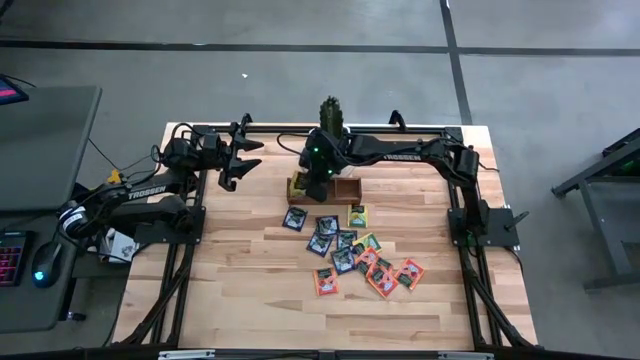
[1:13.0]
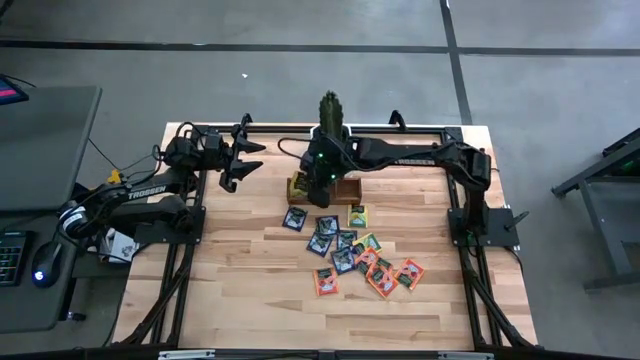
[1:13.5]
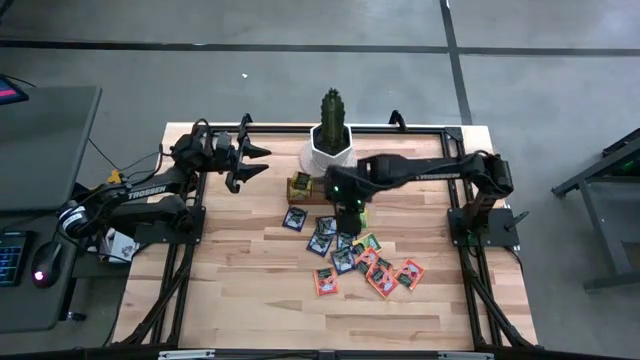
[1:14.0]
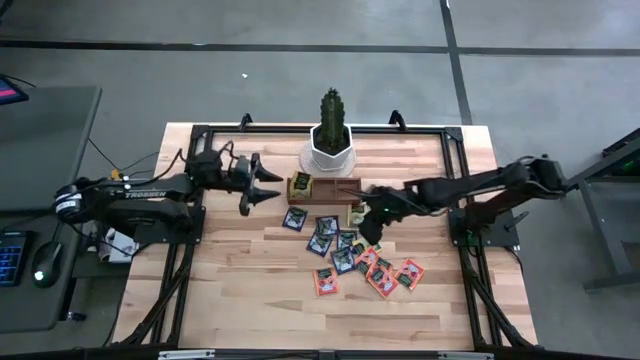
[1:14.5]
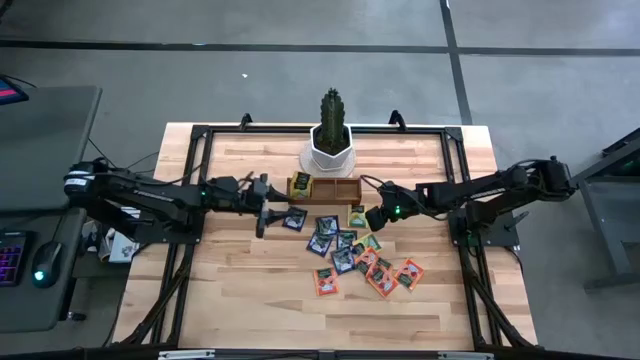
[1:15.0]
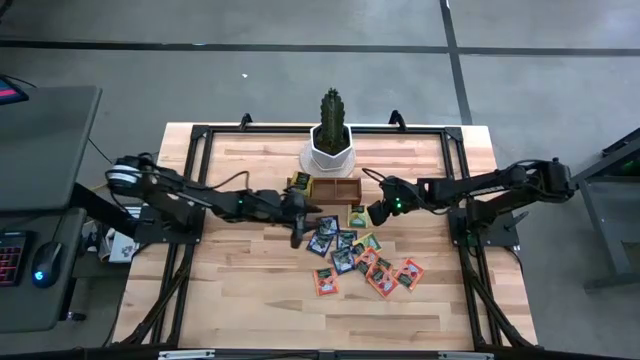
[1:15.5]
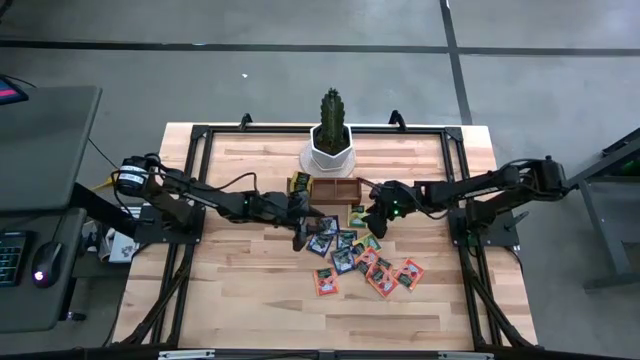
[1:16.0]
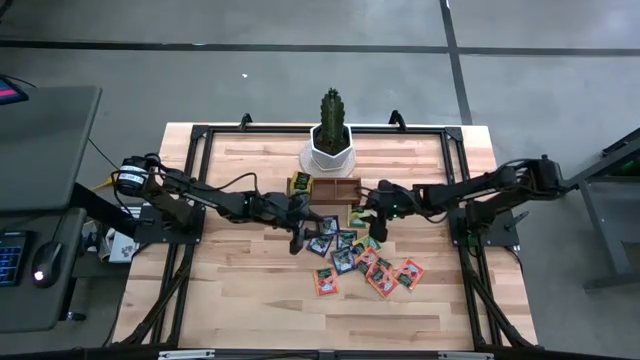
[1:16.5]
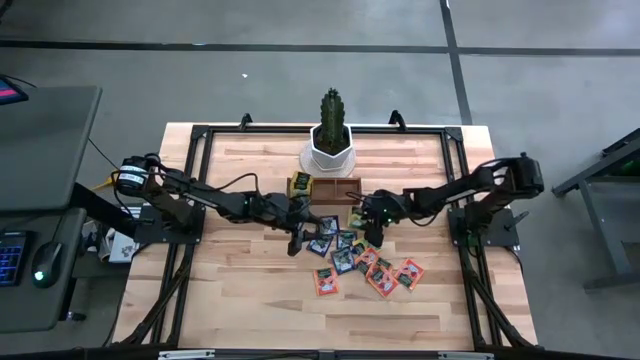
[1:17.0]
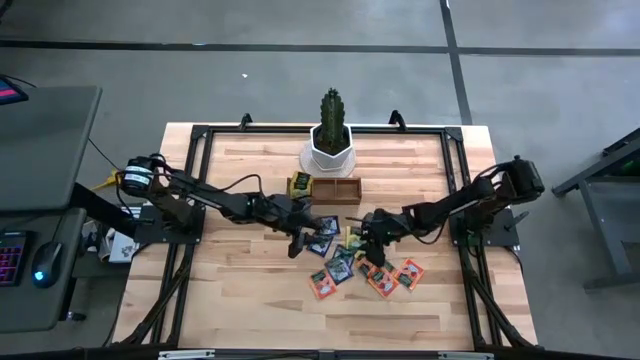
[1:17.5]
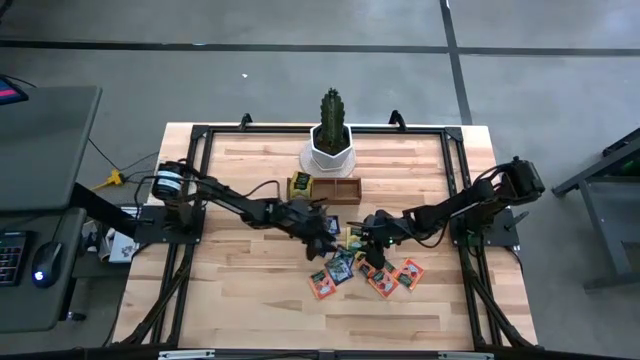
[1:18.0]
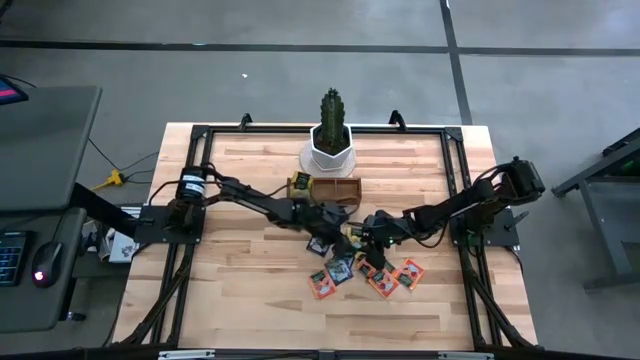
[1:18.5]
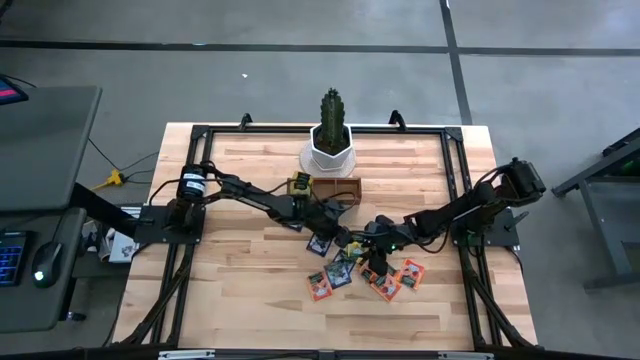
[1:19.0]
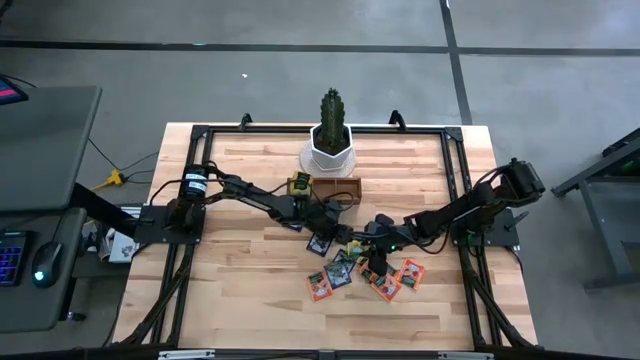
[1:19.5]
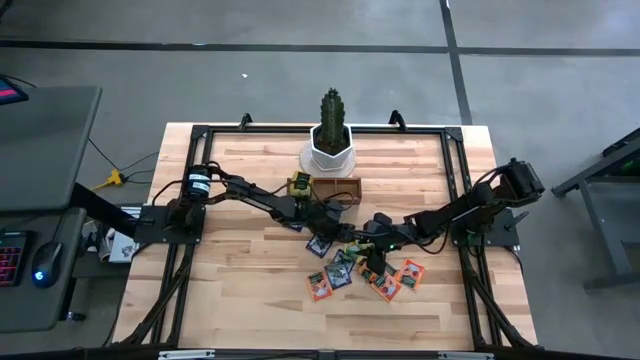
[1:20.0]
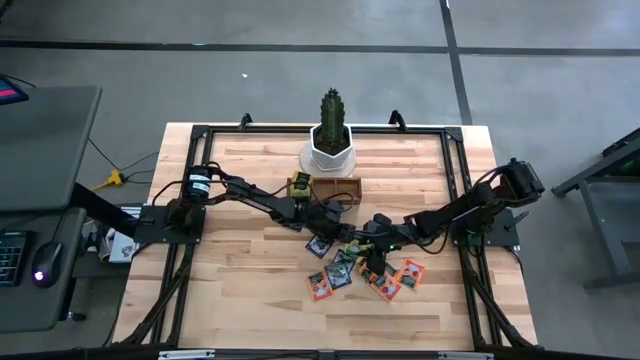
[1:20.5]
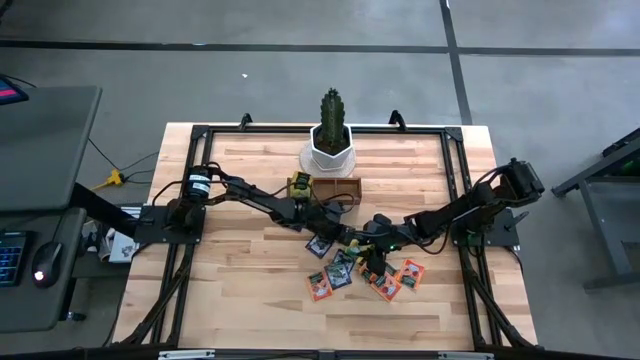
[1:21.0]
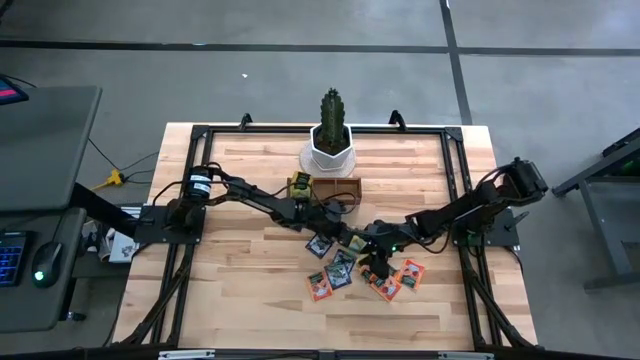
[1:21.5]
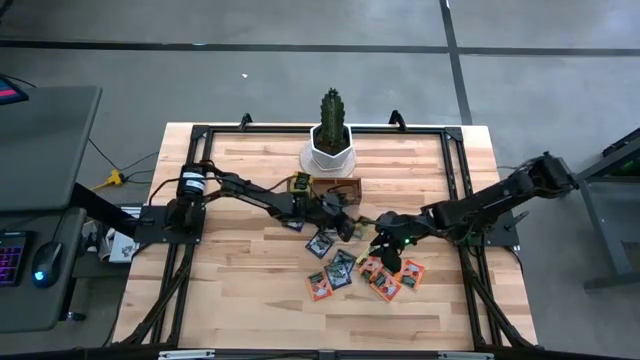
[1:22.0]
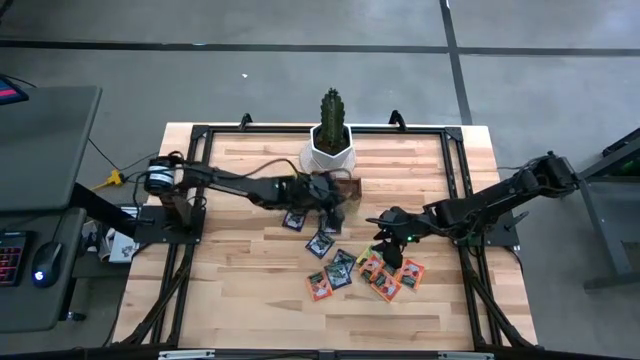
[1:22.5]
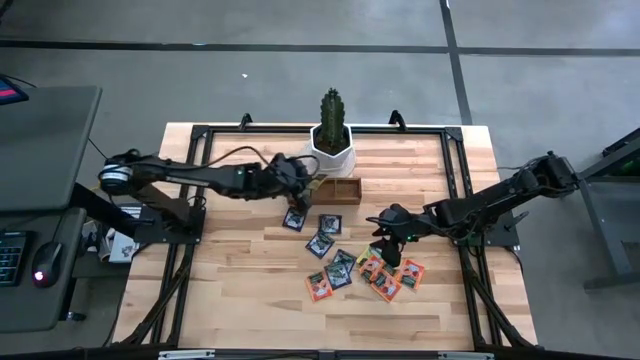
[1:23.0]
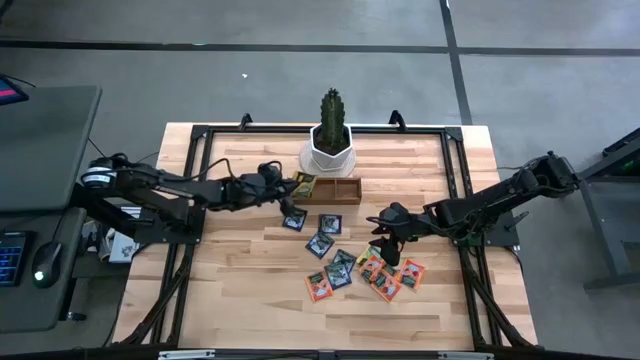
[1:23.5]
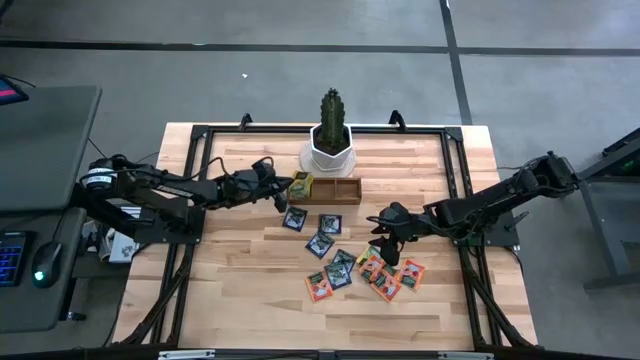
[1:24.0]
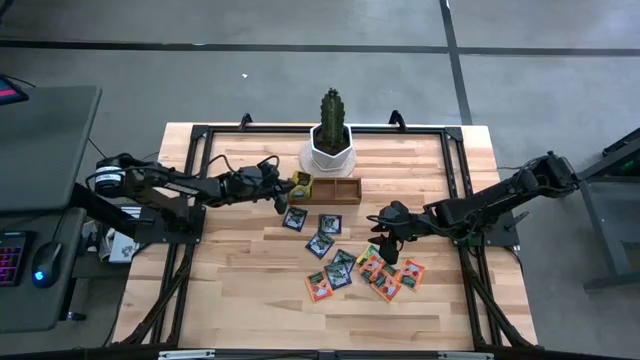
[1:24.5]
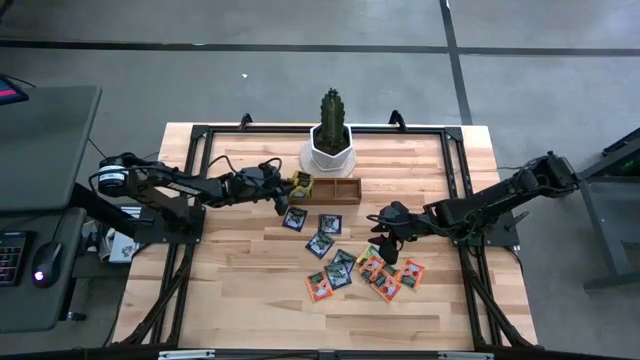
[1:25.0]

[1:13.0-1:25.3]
Task: Pick & Place Tea
Put the yellow tea bag into the left section of the wooden organizer

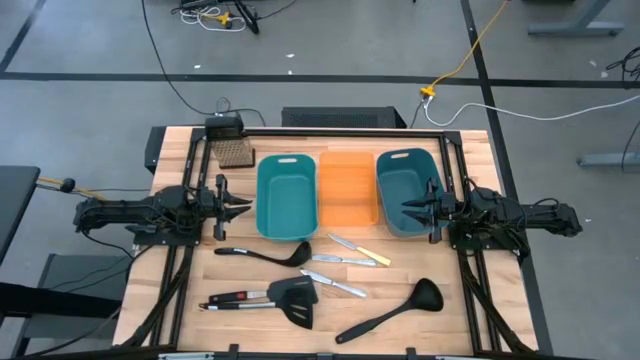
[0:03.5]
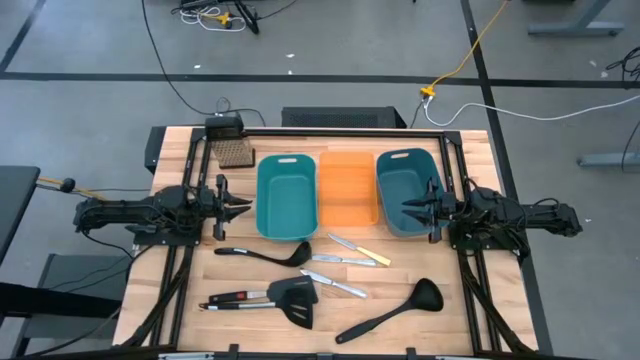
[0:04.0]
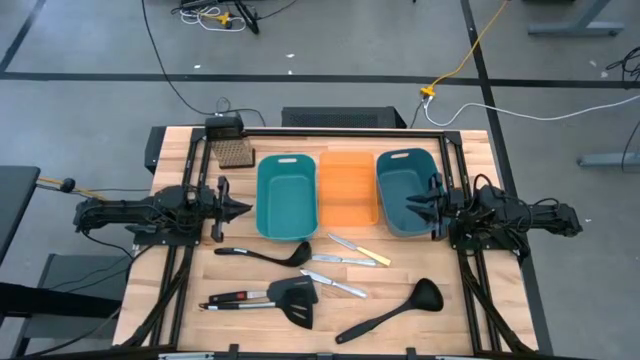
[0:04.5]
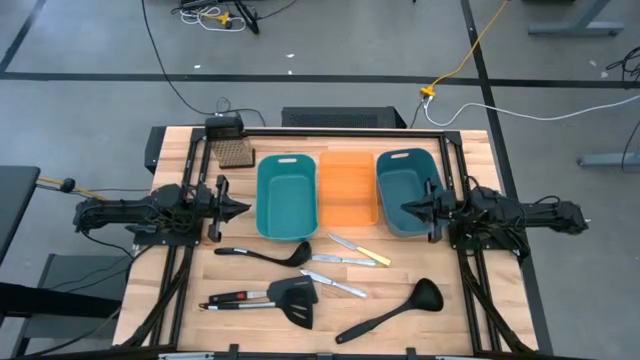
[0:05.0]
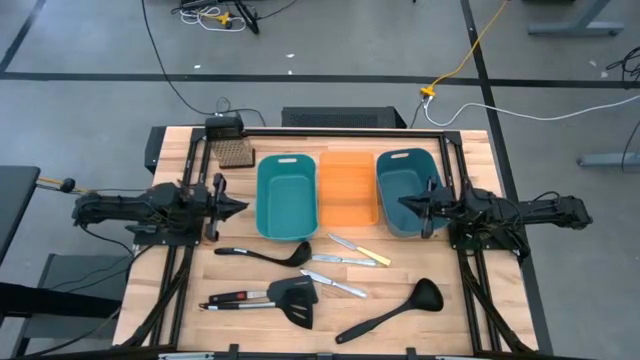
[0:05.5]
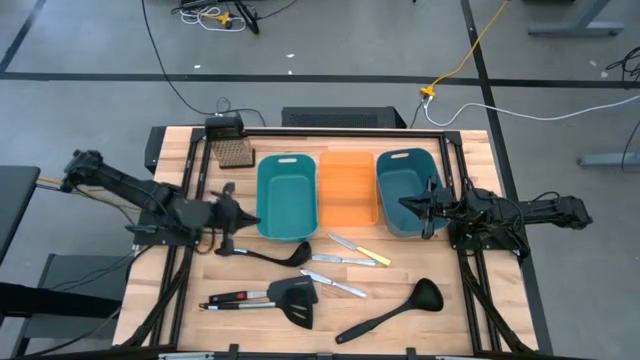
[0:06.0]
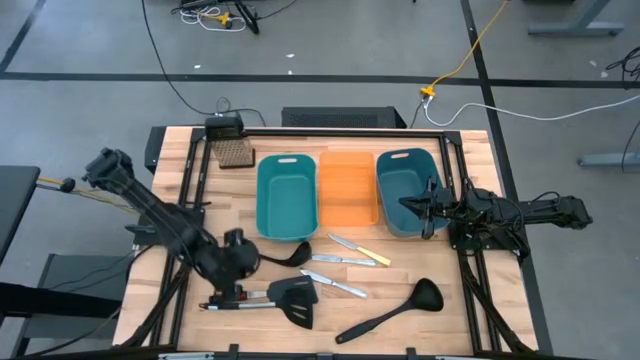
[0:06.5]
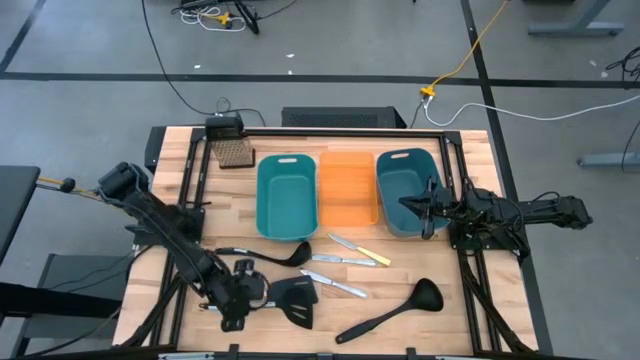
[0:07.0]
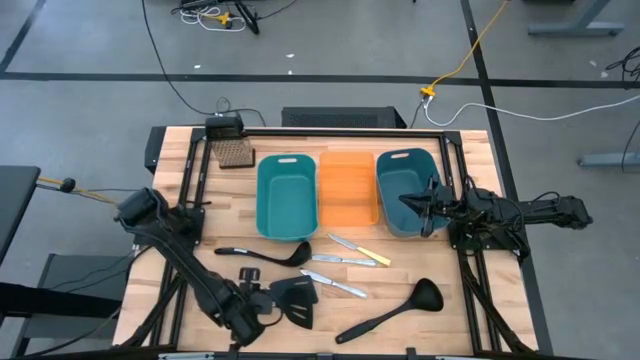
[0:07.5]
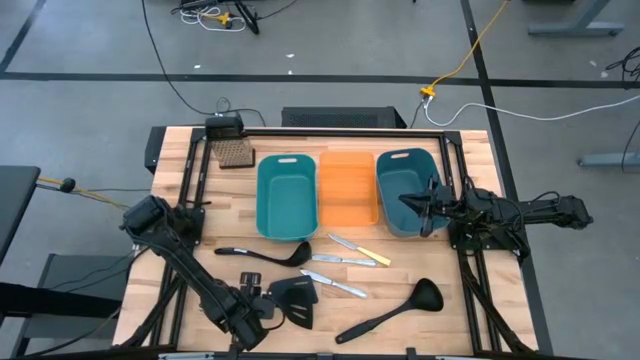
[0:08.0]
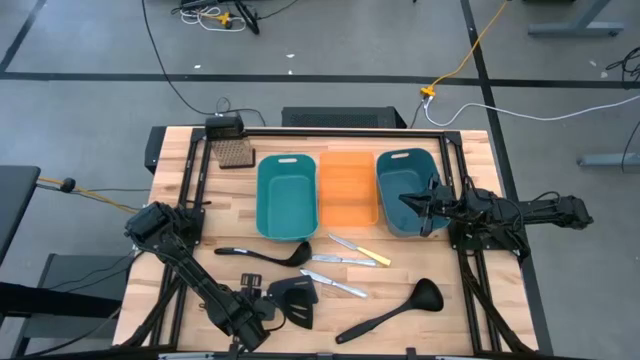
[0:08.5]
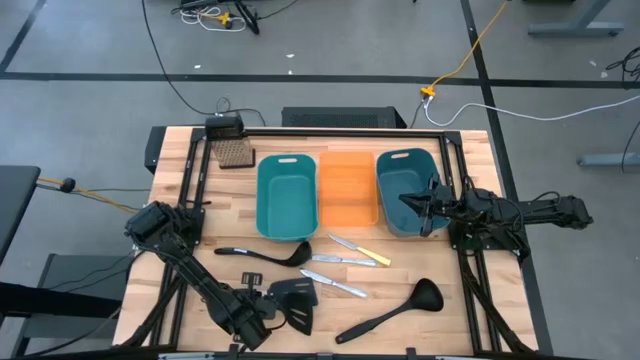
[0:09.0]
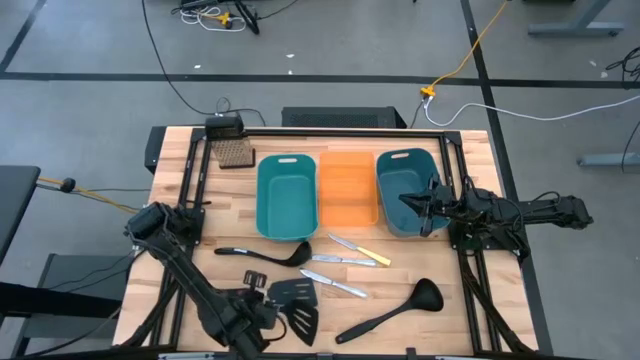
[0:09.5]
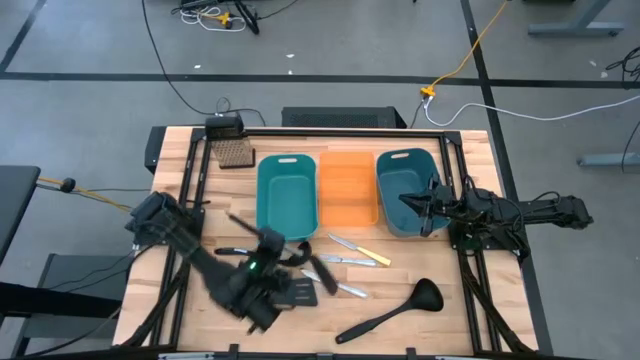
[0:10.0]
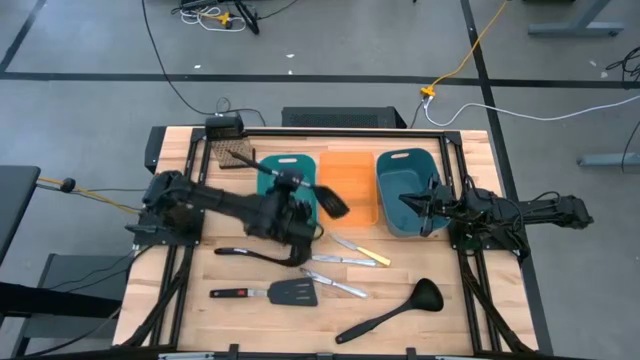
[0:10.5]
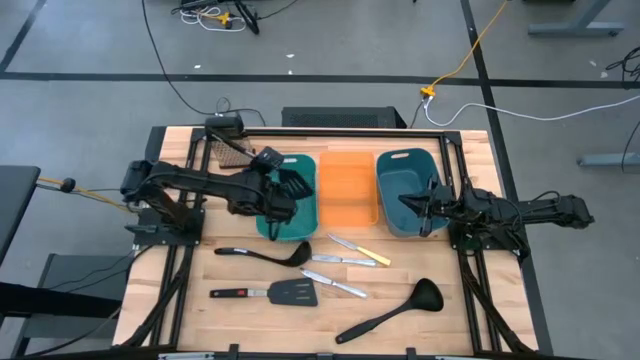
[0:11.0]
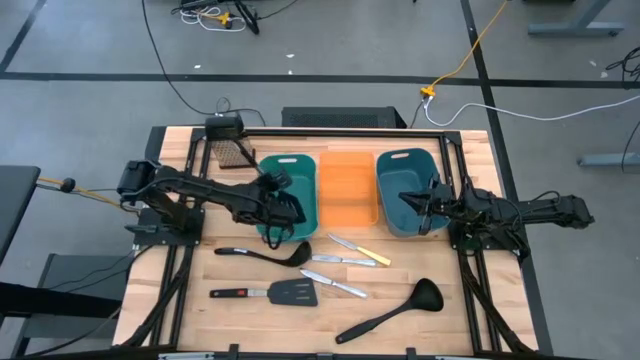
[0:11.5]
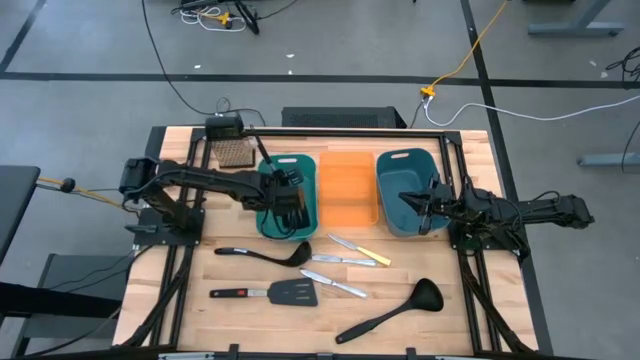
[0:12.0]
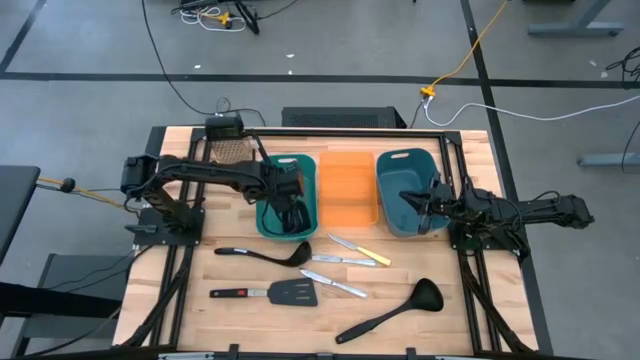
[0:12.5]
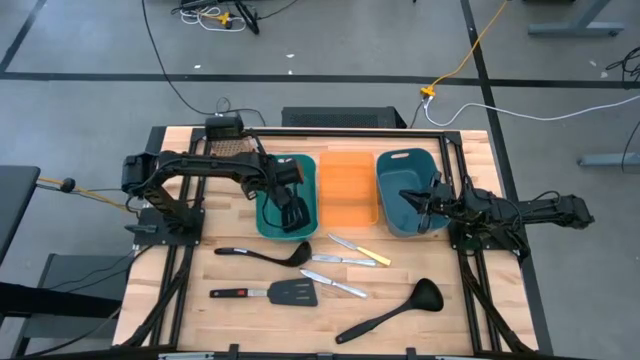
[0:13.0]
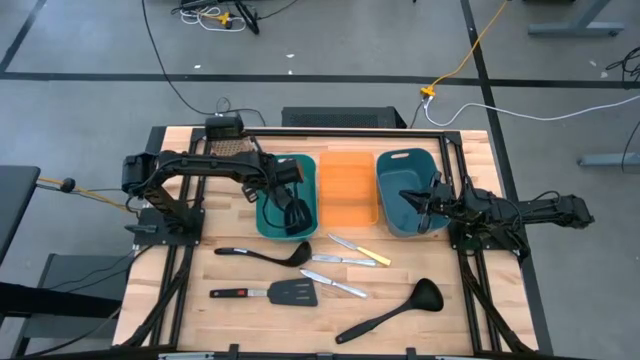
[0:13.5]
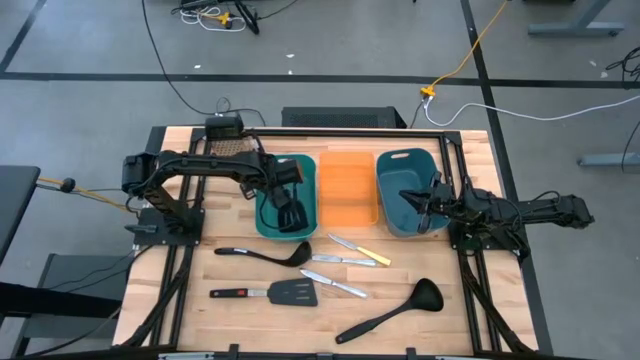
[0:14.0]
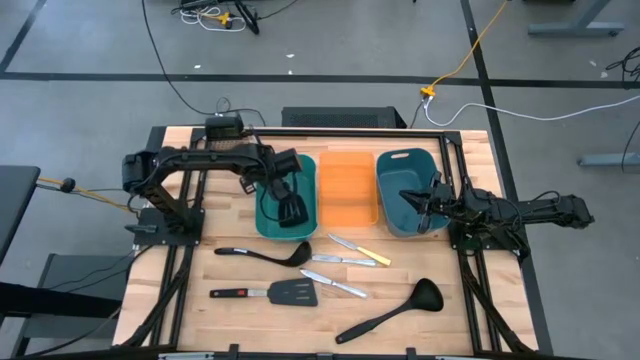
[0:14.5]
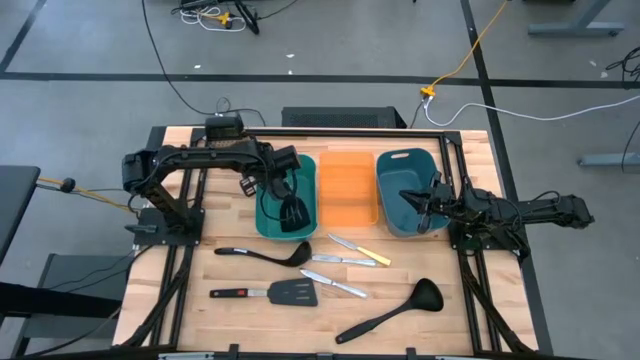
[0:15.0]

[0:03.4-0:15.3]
Task: Pick & Place Kitchen Items
Put the black spatula into the dark green bin
